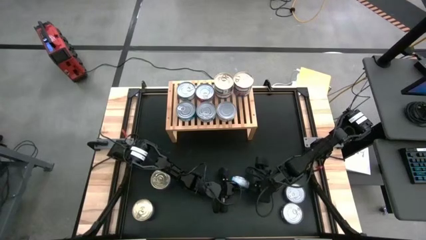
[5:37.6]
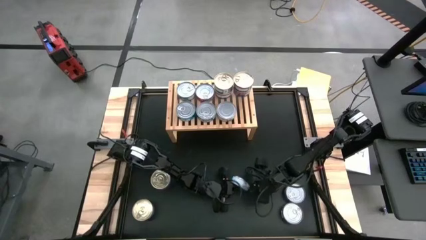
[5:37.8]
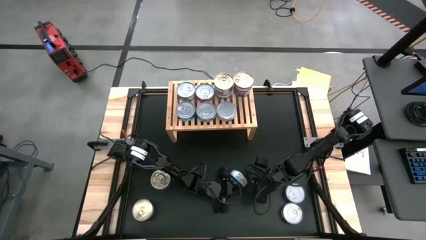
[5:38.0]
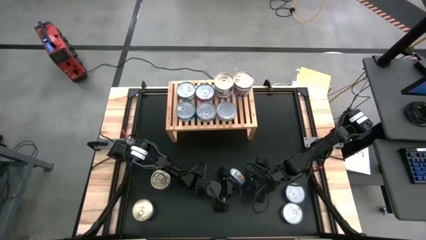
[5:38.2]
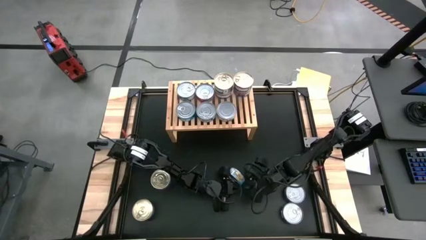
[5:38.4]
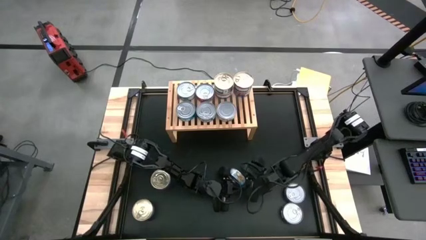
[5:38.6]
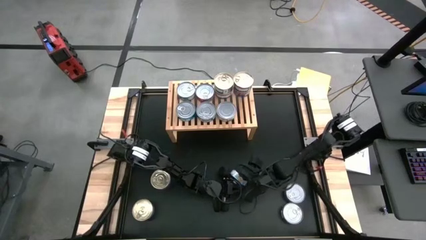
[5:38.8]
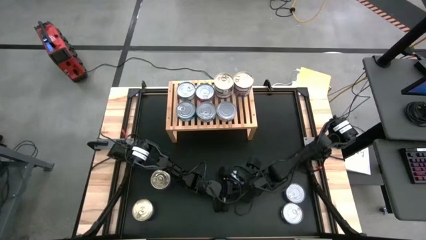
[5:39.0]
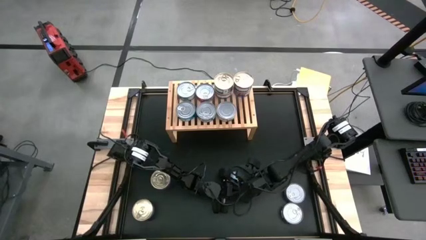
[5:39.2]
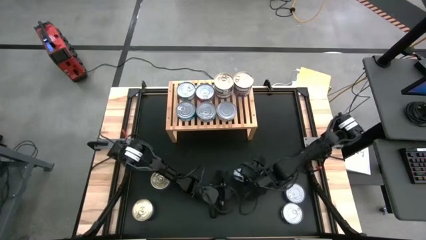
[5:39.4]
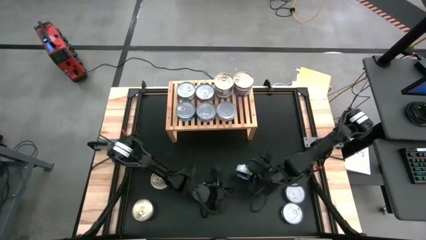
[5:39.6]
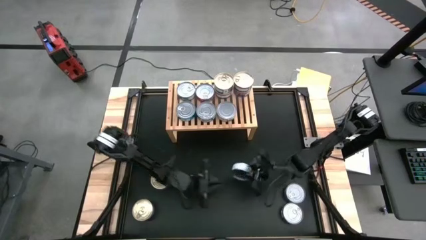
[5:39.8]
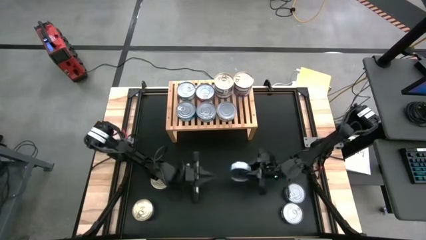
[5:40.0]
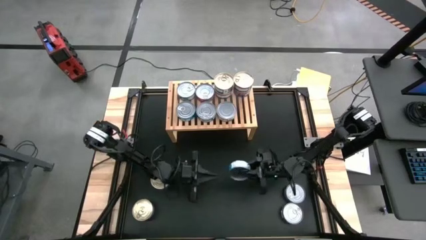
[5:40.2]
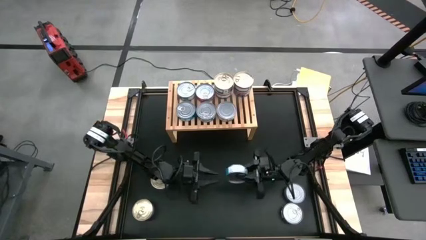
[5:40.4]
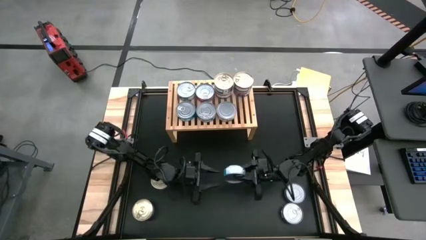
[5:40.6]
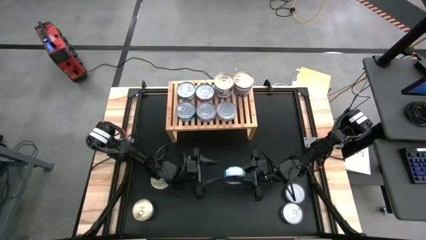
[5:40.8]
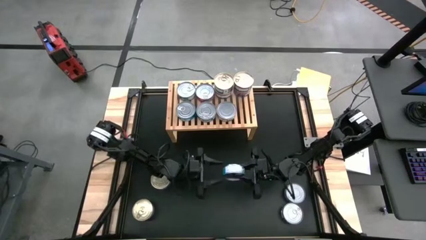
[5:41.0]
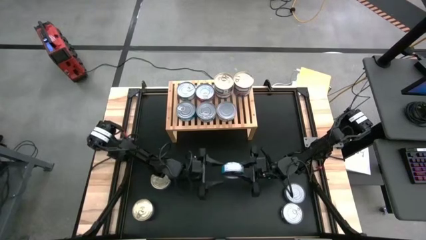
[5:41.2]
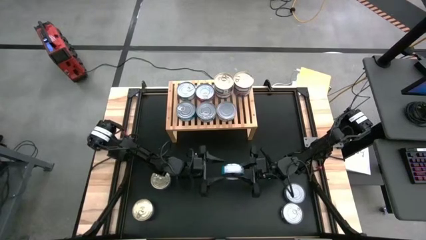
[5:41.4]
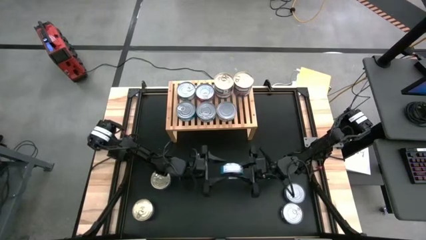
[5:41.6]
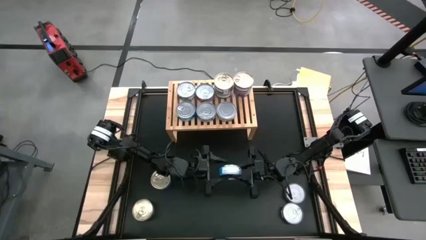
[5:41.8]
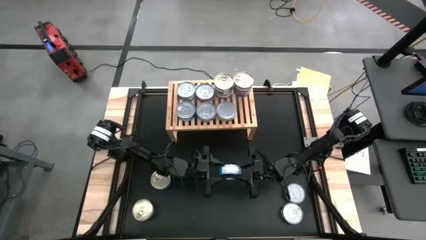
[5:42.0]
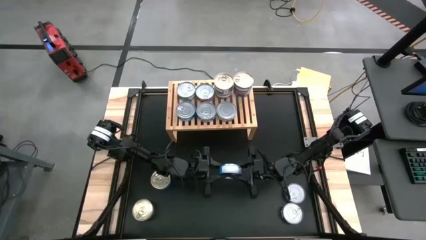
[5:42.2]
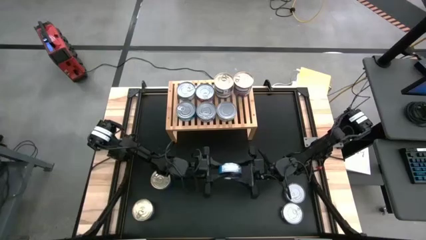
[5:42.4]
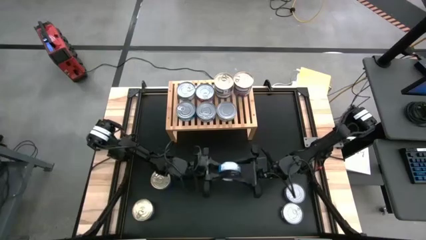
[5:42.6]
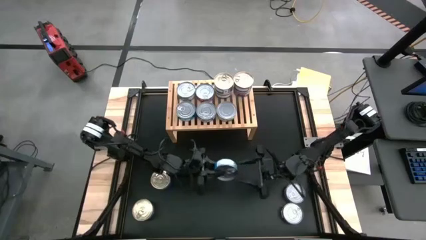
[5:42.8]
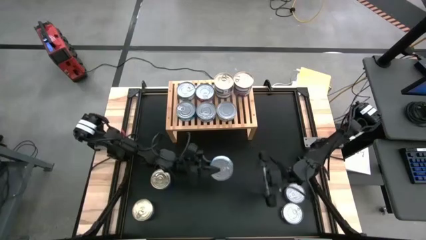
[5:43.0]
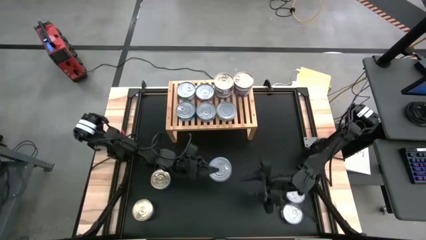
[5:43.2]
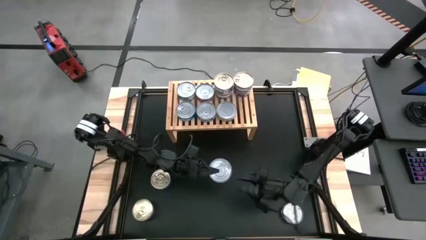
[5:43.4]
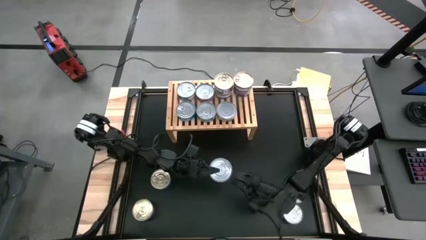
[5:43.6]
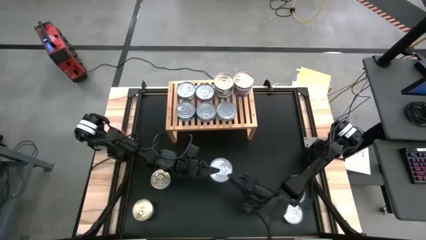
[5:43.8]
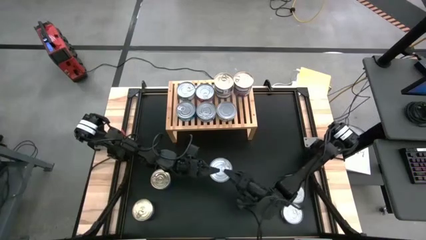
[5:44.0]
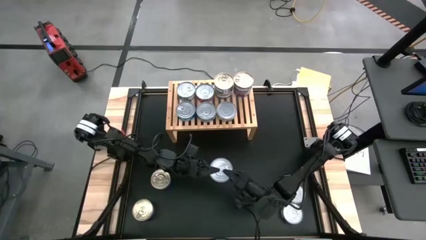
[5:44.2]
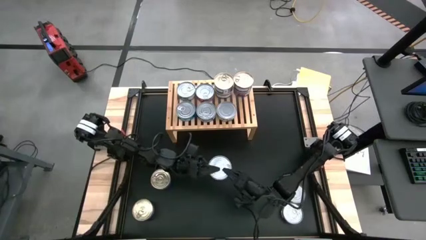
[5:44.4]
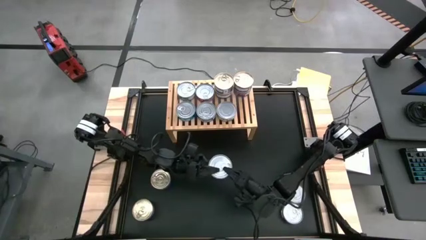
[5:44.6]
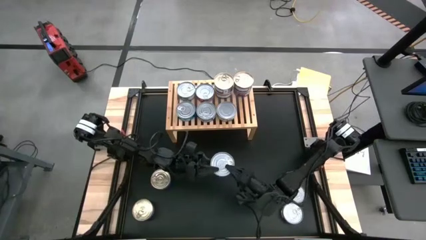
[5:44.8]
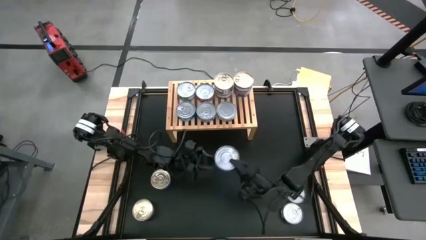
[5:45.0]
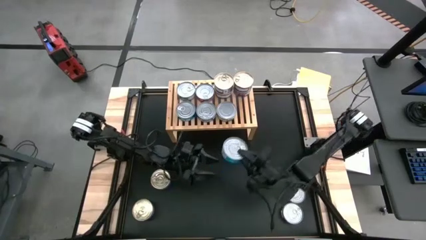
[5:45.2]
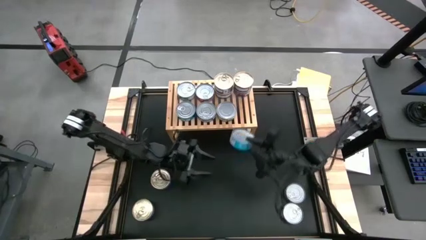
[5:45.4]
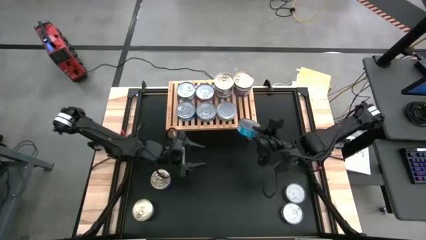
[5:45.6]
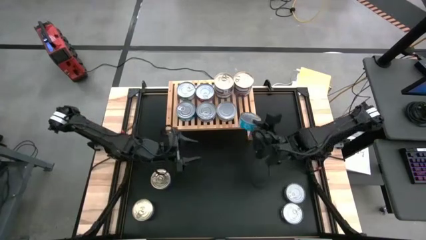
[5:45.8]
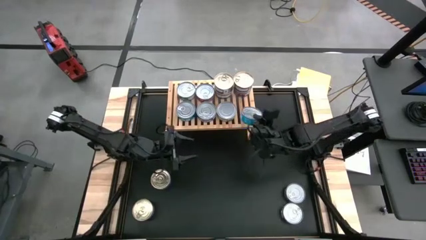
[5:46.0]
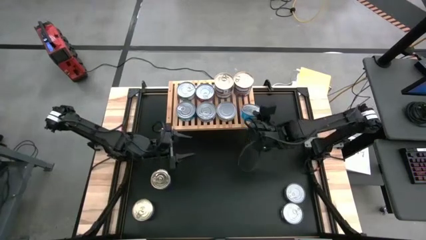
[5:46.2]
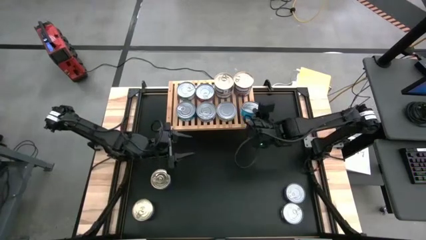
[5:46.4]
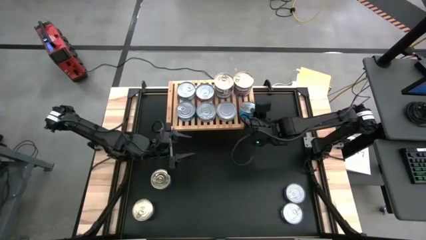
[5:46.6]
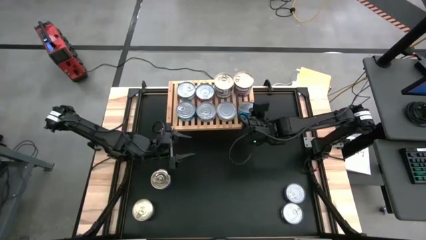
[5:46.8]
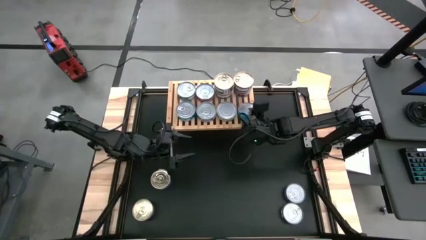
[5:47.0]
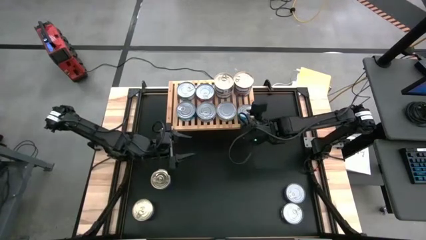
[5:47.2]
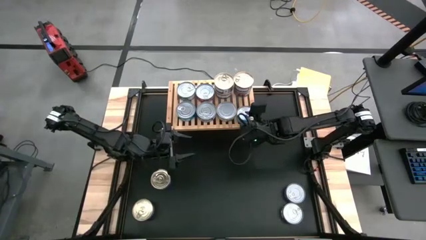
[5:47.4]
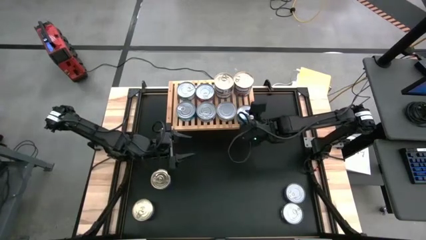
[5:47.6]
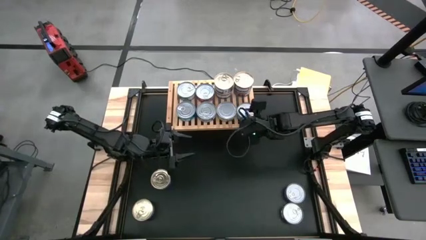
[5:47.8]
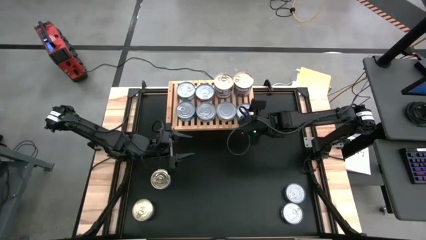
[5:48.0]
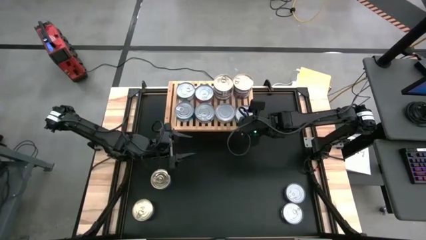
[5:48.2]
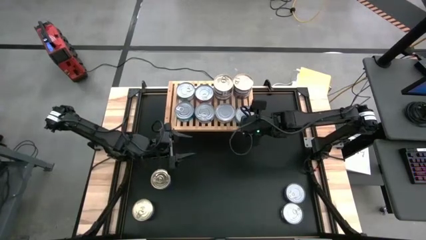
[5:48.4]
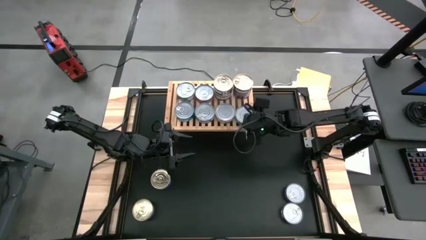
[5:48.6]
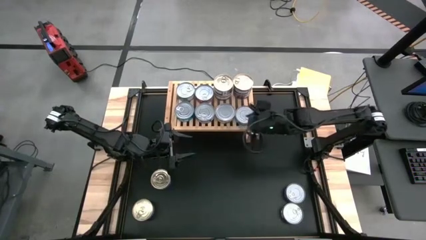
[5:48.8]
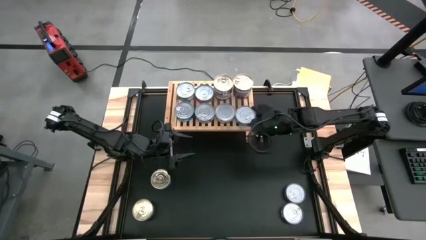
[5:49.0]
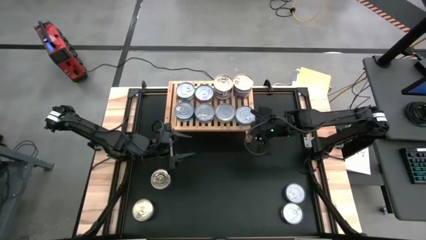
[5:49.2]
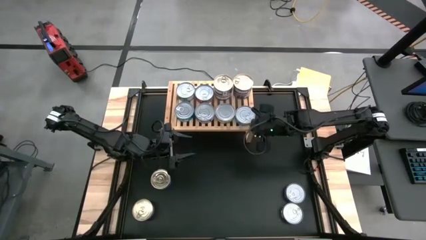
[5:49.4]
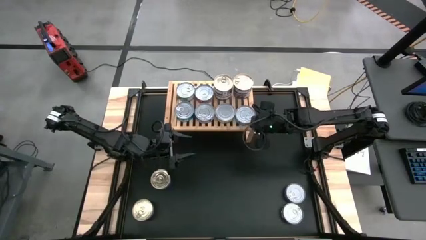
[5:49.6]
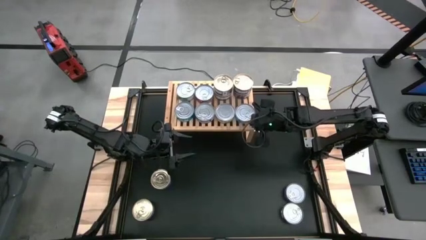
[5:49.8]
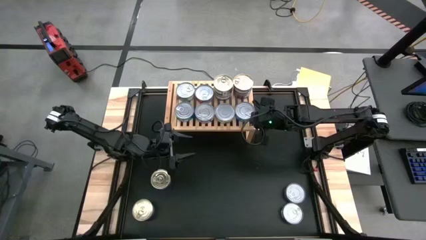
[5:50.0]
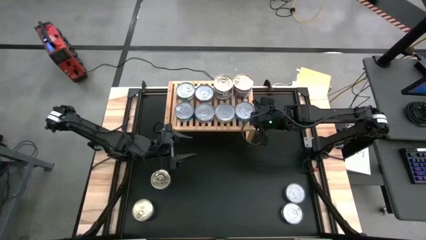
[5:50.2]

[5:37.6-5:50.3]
Task: Stack canned seafood by type on shelf
Put the light blue tuna can on the shelf

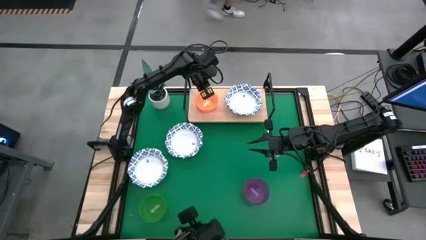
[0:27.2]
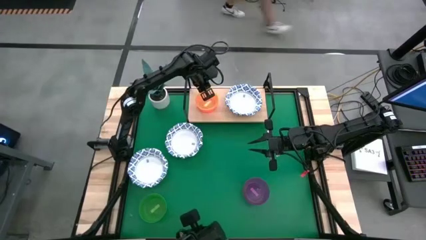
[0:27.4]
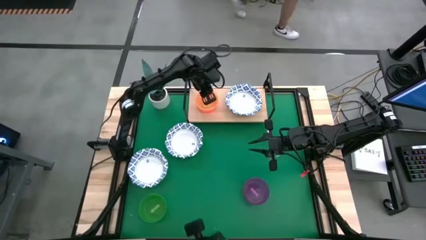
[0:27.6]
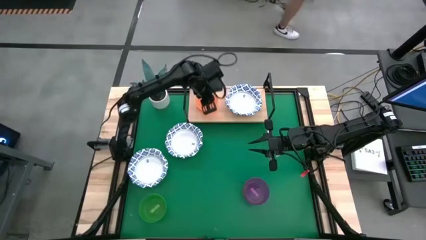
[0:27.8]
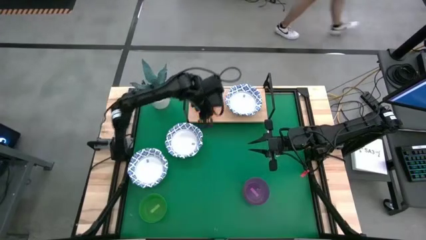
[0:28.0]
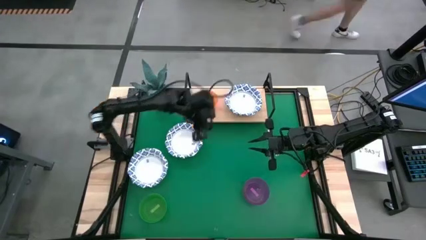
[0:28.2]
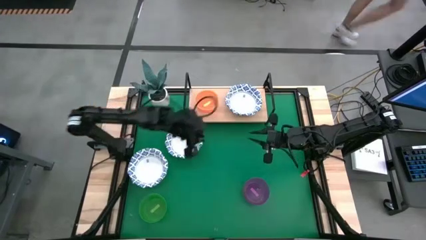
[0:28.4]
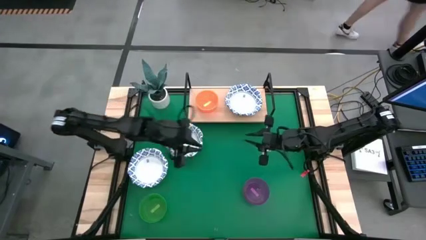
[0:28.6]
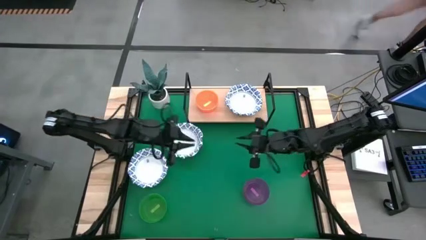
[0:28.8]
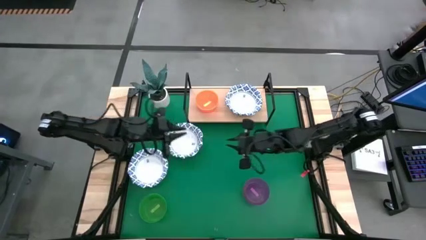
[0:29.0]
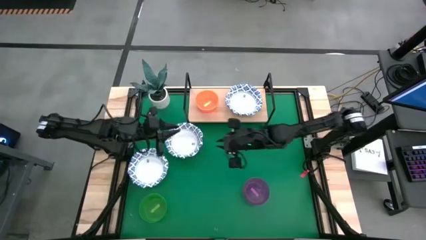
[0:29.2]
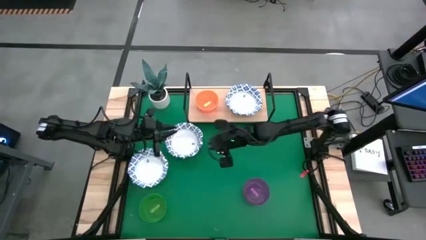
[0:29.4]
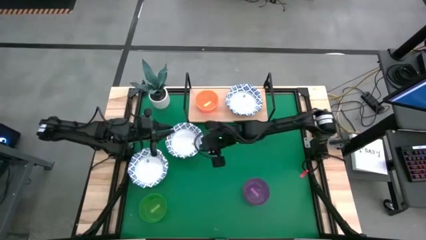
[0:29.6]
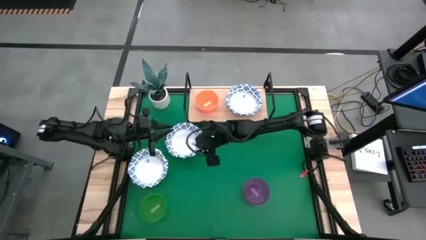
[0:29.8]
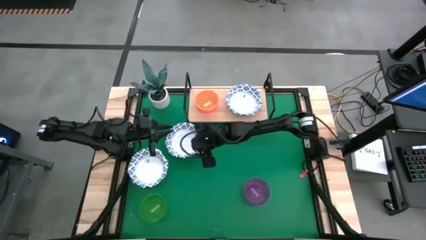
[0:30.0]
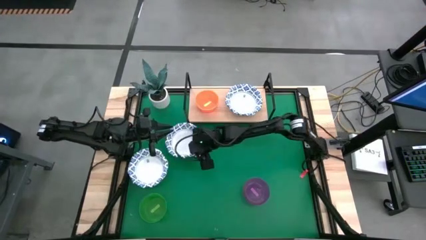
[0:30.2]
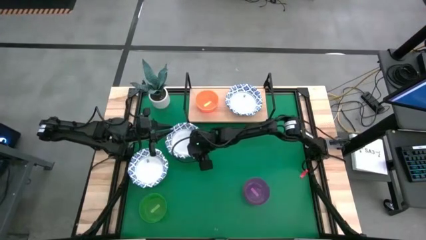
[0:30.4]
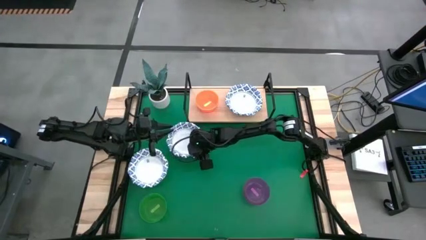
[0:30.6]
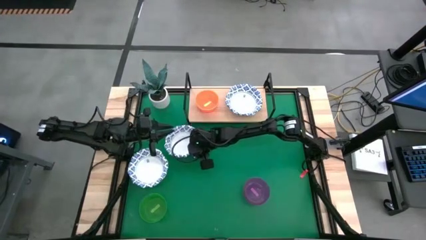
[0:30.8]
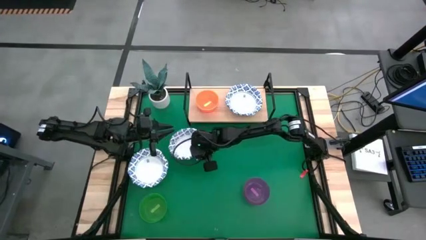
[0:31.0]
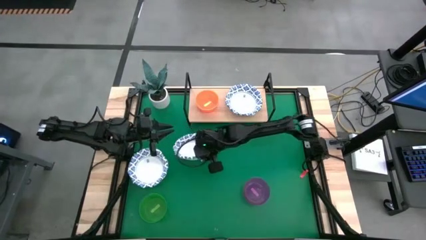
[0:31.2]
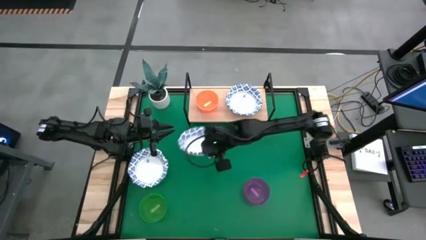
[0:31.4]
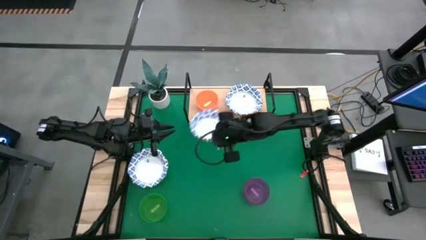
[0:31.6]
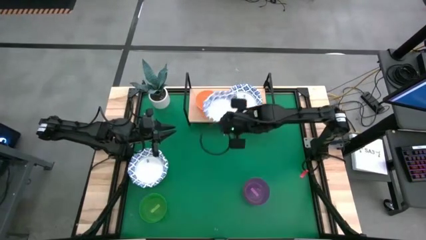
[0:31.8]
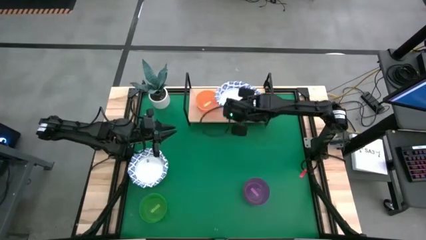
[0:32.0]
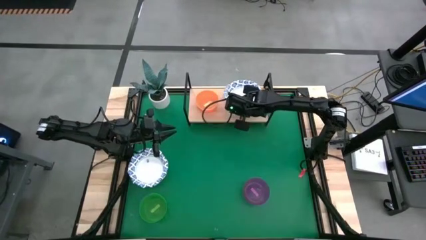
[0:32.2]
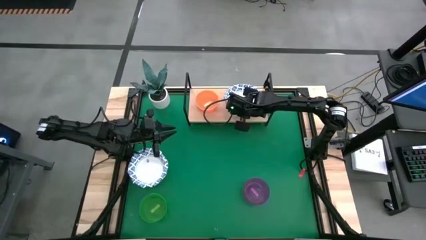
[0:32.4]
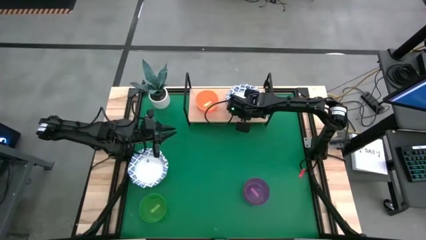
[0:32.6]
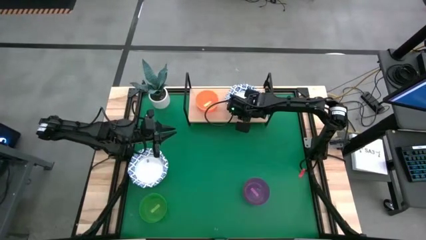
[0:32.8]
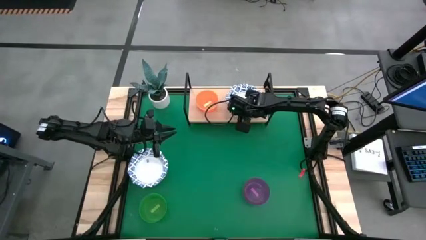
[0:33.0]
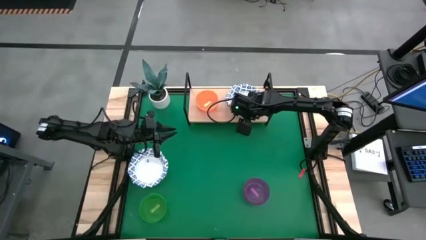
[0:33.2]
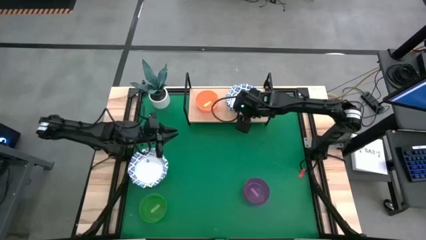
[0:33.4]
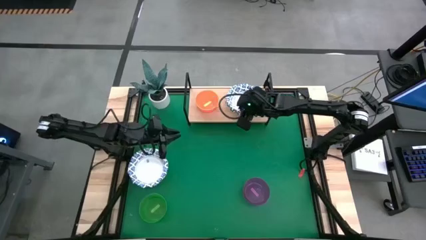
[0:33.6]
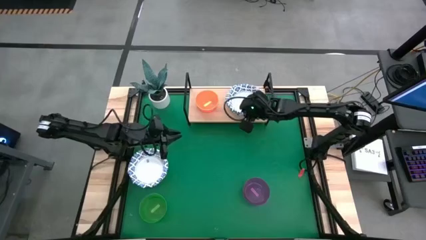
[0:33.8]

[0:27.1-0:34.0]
Task: Place and stack bowls onto a shelf
Stack the white patterned bowl on top of the white patterned bowl on the shelf
